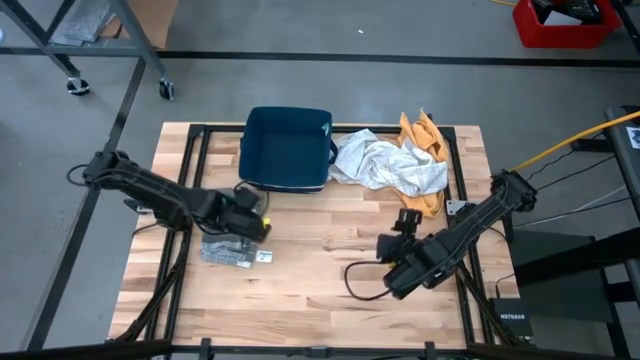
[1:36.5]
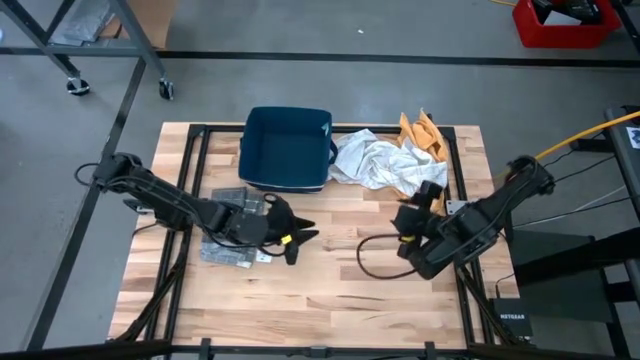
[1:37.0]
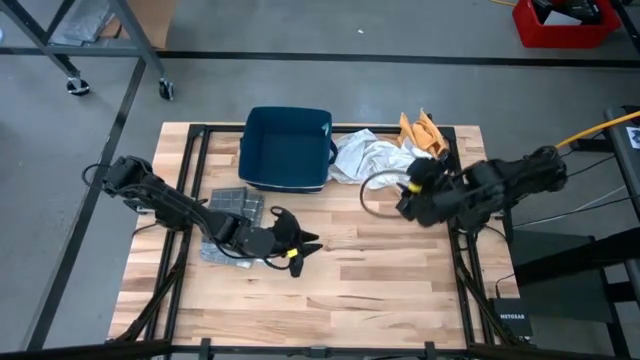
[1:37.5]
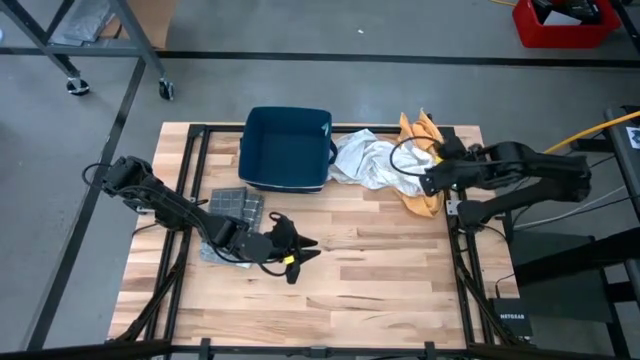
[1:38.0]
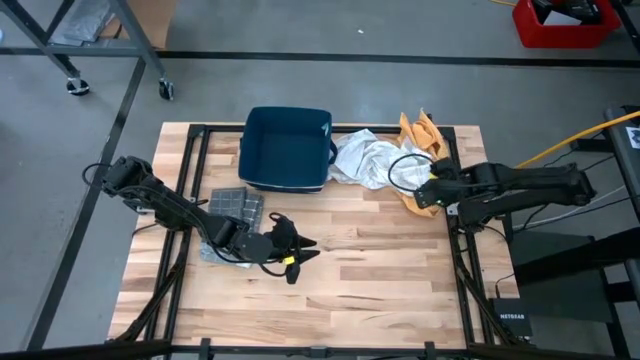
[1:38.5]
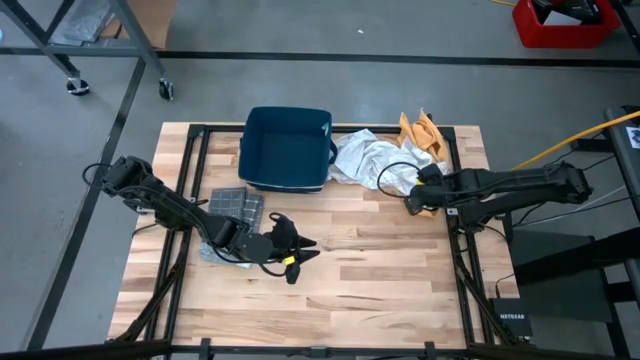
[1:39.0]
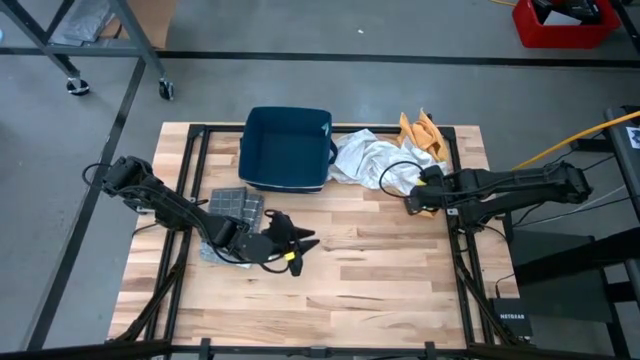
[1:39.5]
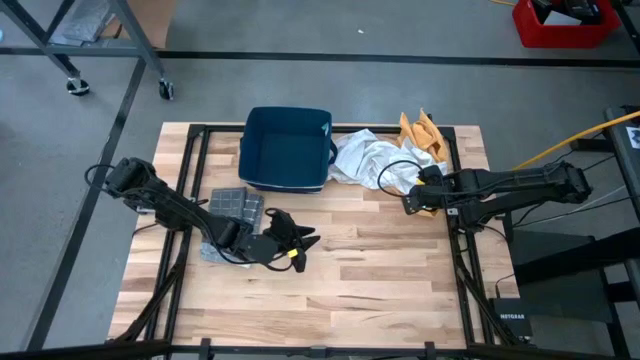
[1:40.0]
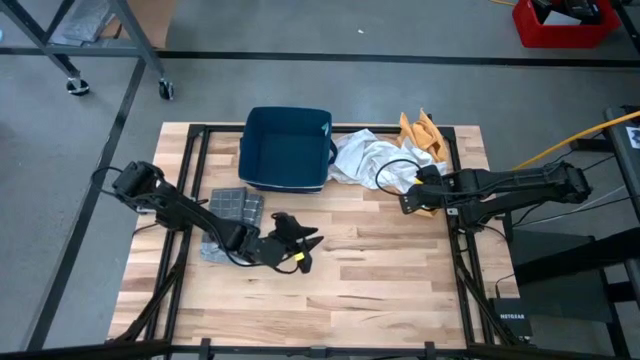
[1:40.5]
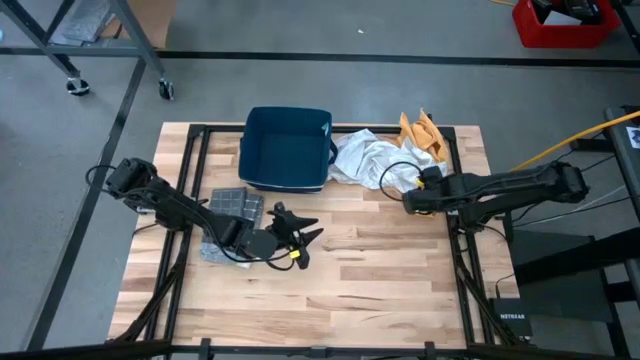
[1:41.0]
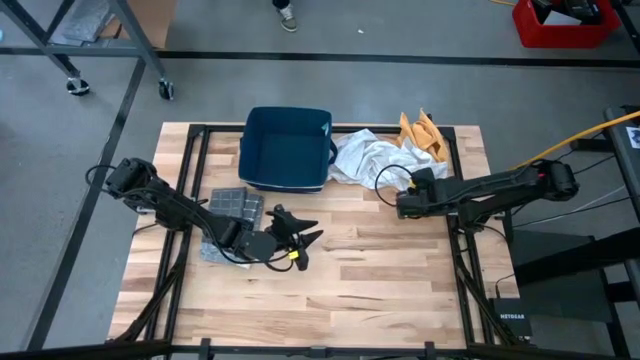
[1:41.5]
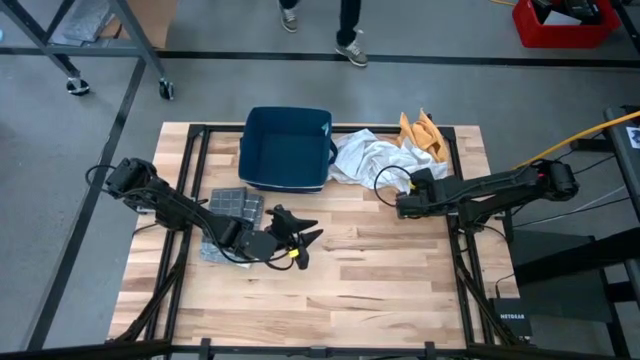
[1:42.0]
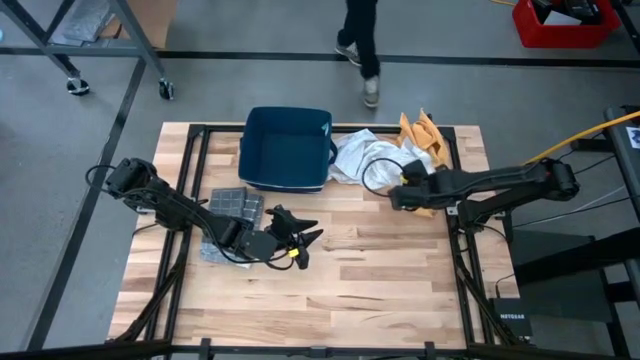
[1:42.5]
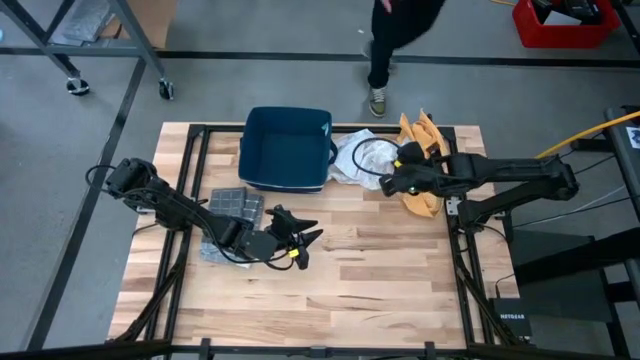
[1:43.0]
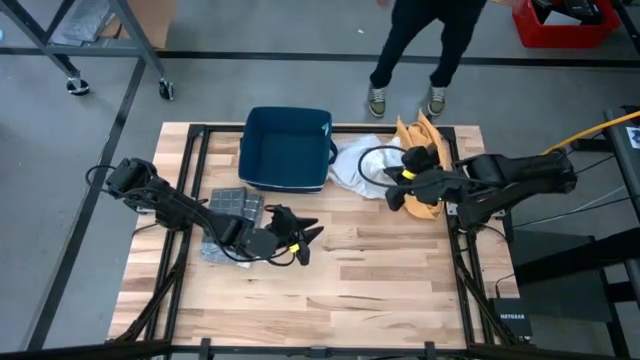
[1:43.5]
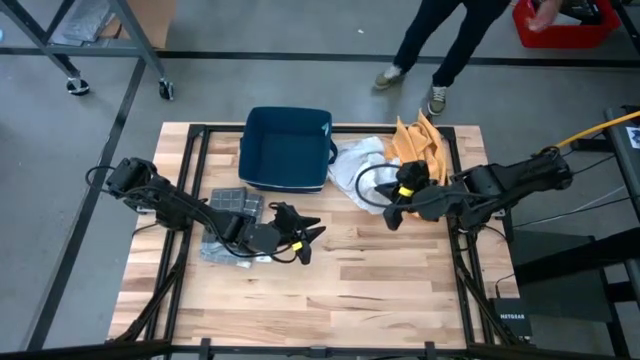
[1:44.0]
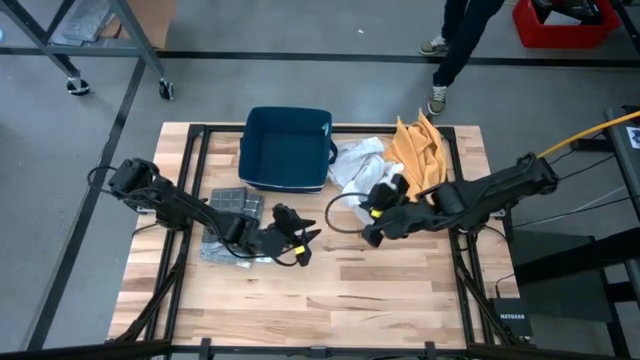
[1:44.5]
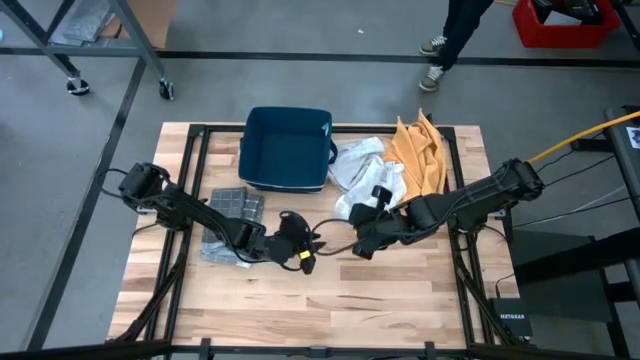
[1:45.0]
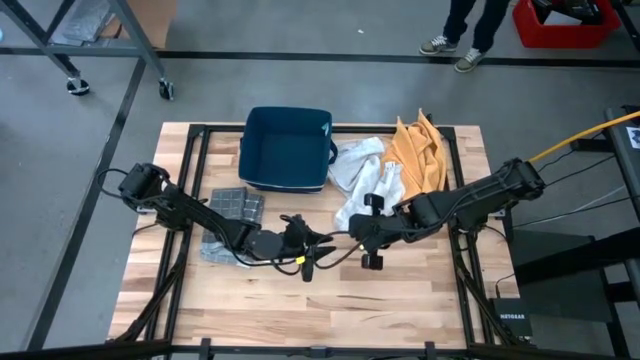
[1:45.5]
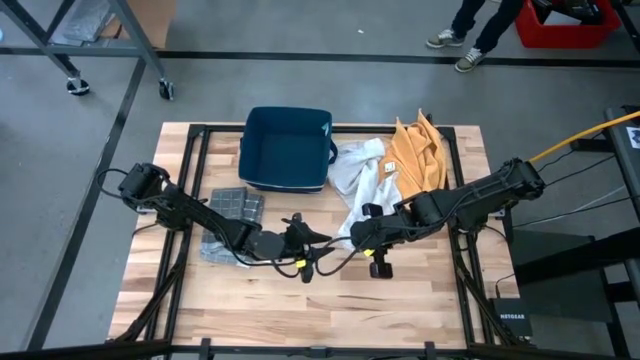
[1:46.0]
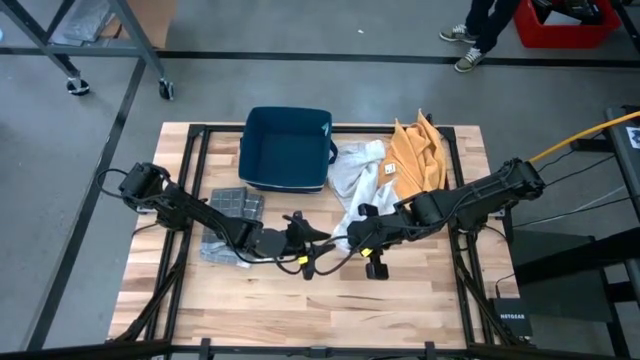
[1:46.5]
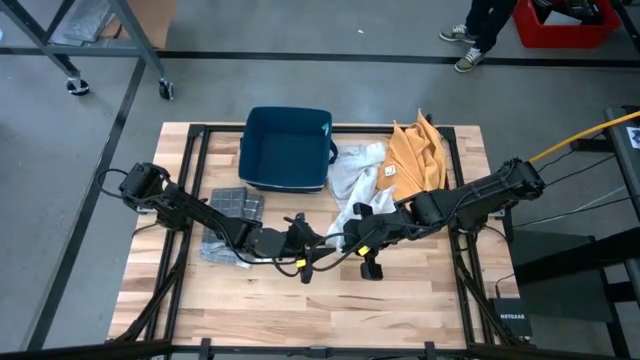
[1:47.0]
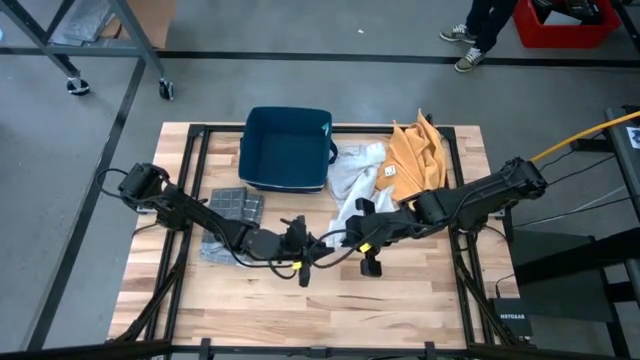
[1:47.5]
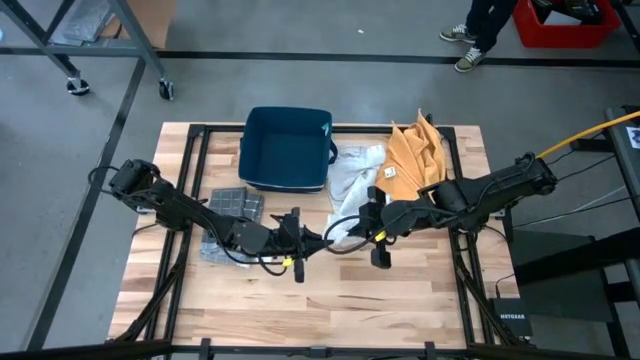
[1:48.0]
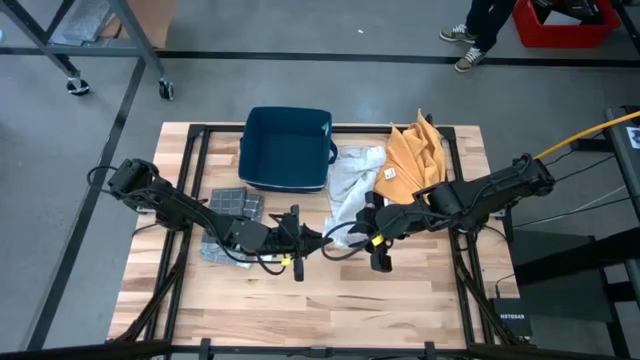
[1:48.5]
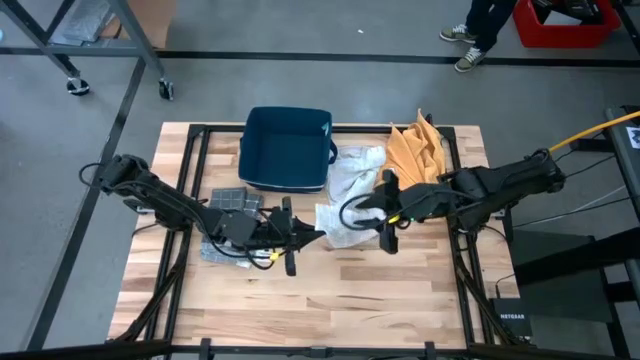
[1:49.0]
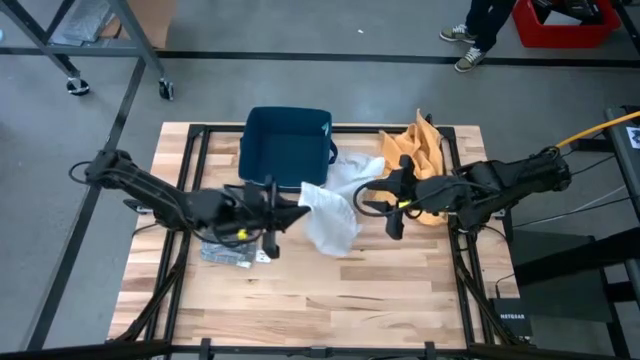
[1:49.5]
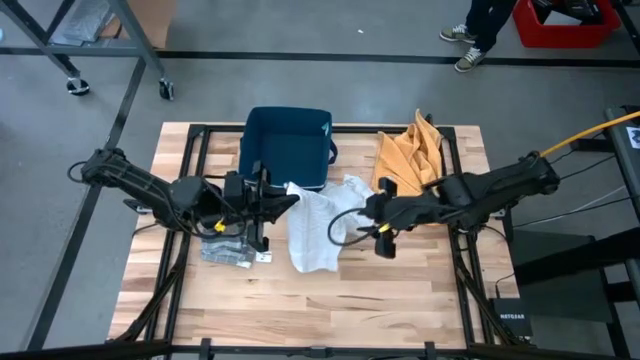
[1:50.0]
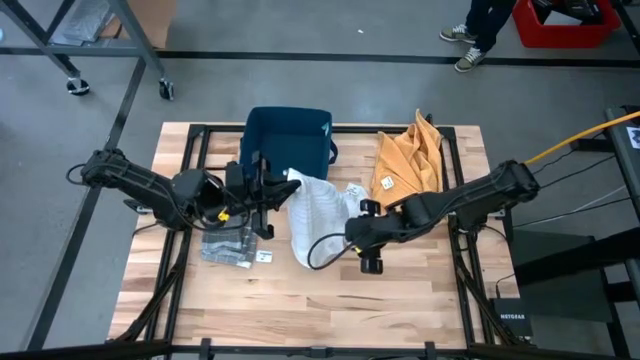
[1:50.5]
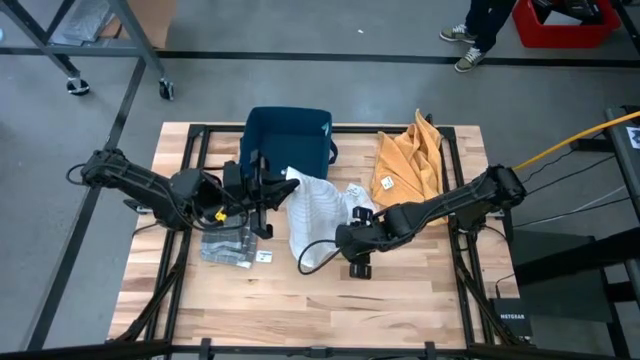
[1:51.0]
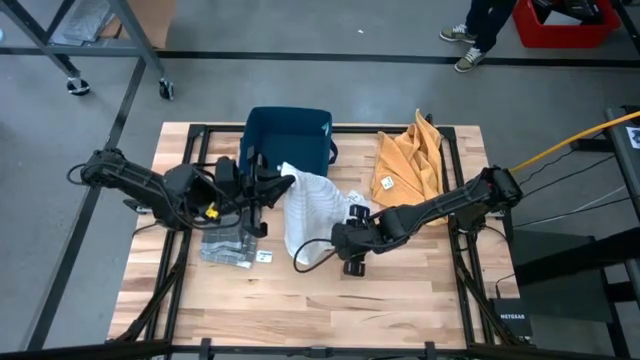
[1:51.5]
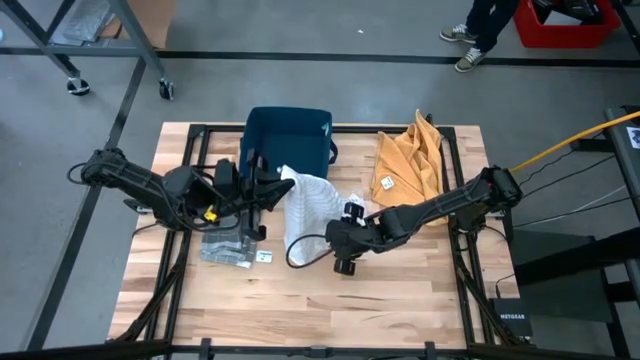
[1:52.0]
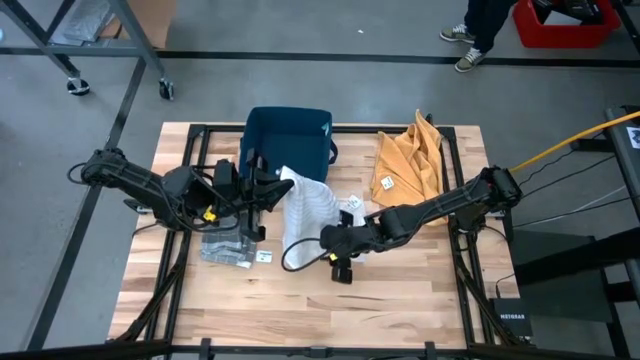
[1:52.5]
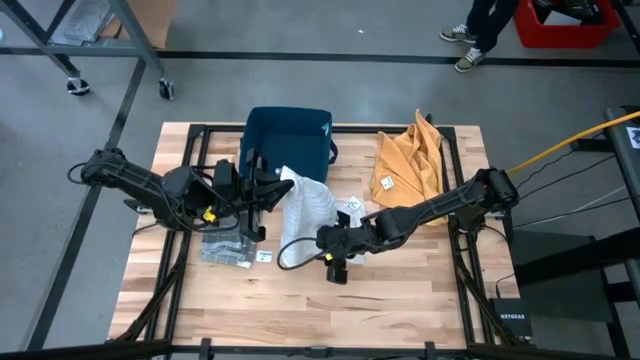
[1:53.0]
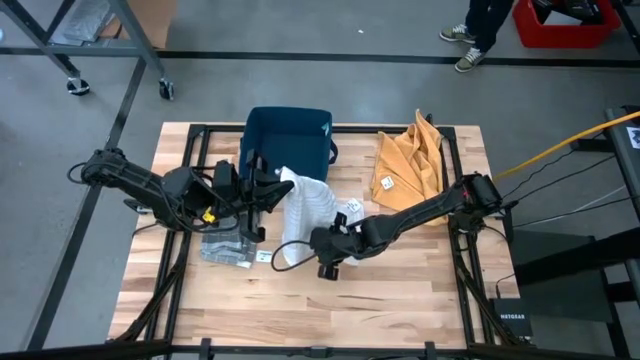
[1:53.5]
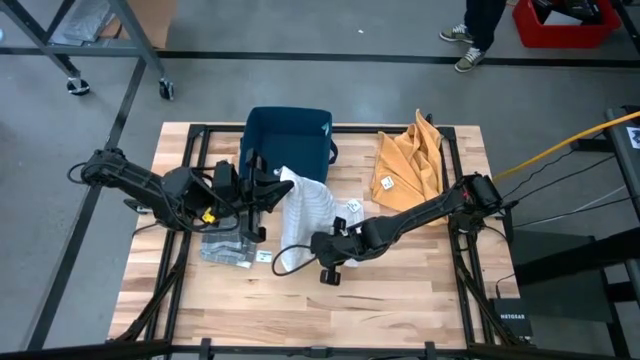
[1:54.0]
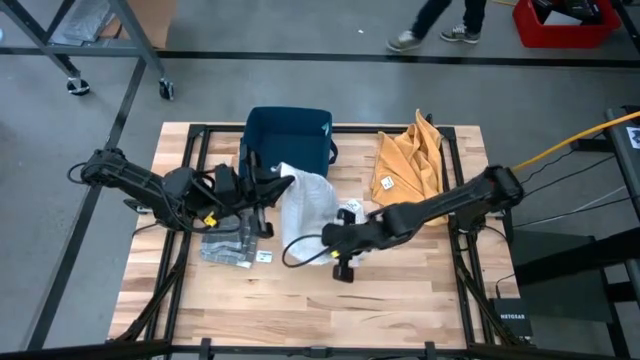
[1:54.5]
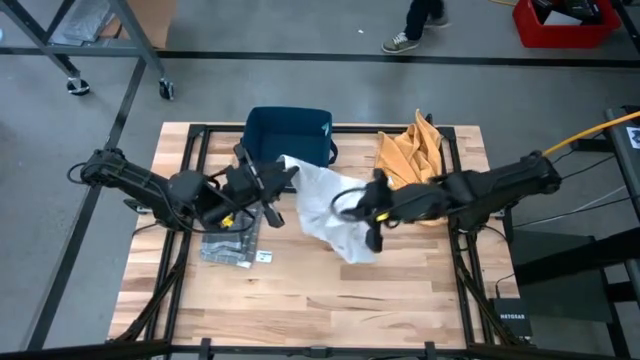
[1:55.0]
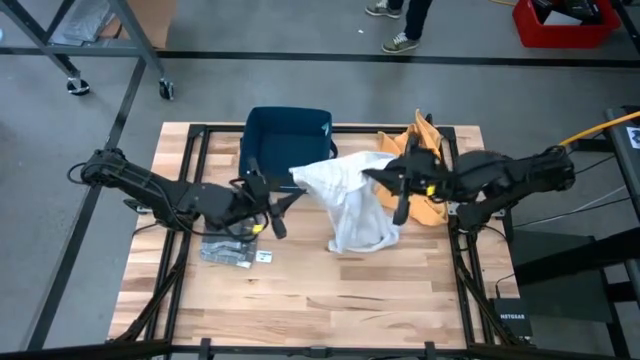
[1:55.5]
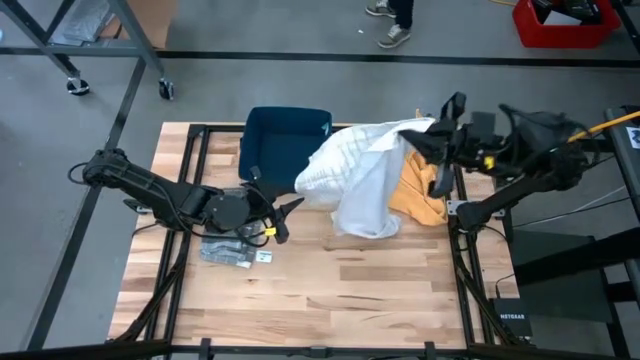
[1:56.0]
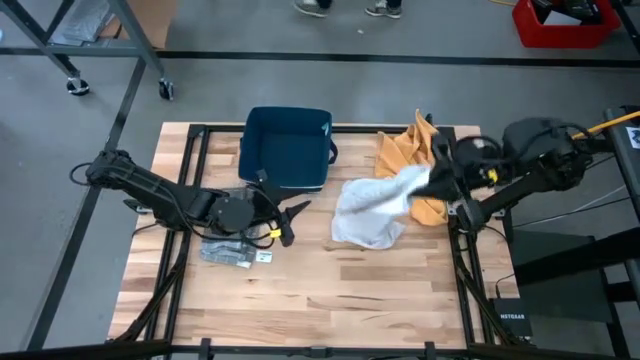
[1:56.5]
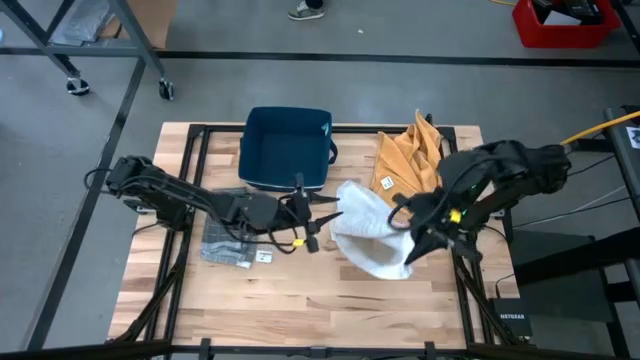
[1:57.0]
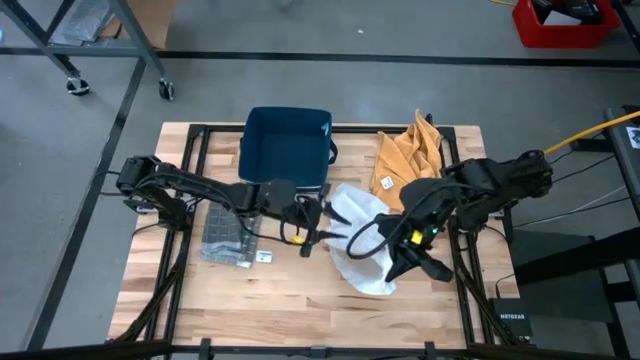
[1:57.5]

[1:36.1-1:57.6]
Task: Fold towel
Fold the white patterned towel

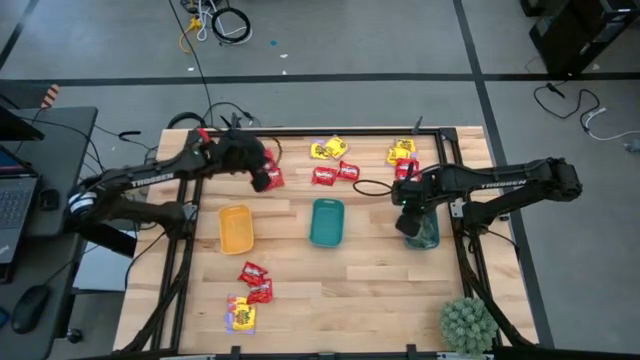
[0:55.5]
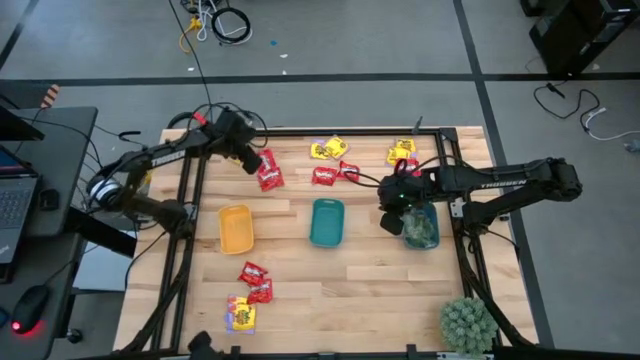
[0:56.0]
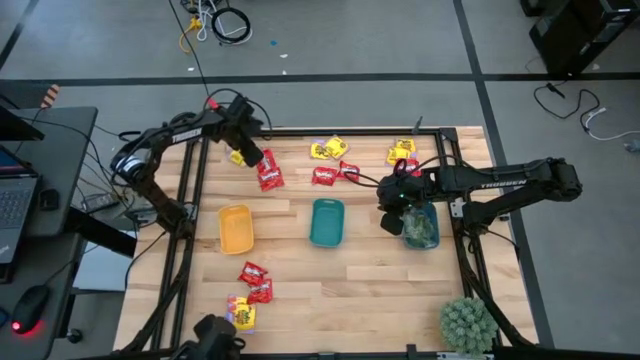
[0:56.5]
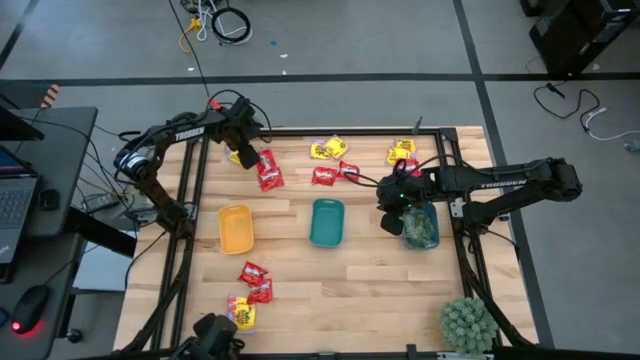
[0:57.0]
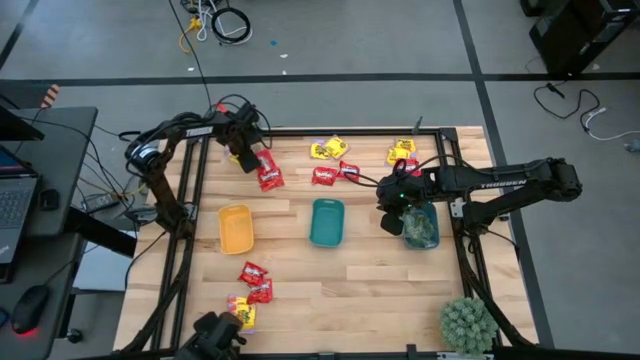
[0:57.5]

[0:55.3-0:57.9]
Task: Sort candy
Put the green transparent candy into the blue bin
